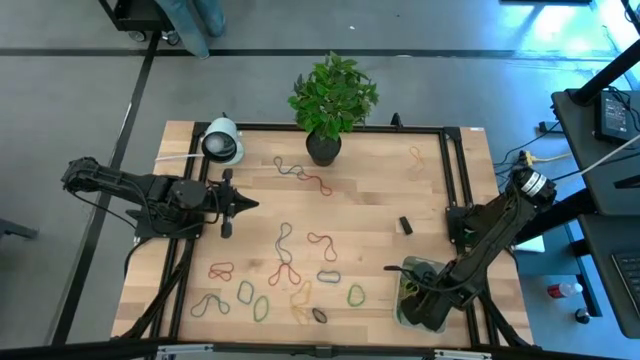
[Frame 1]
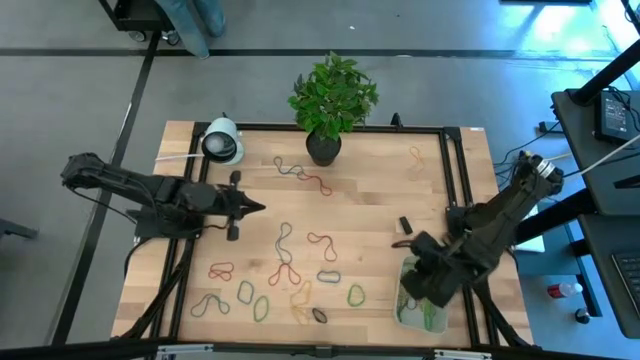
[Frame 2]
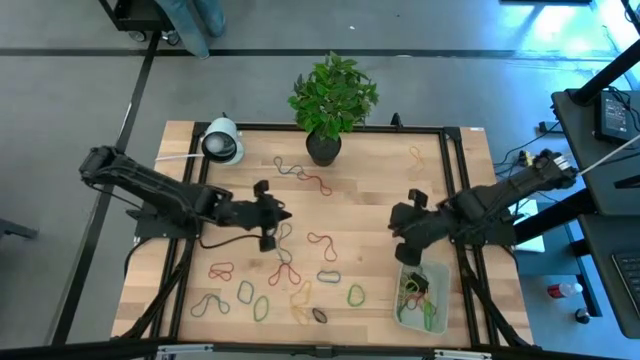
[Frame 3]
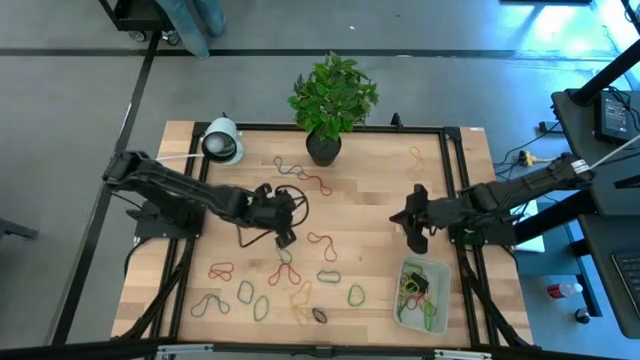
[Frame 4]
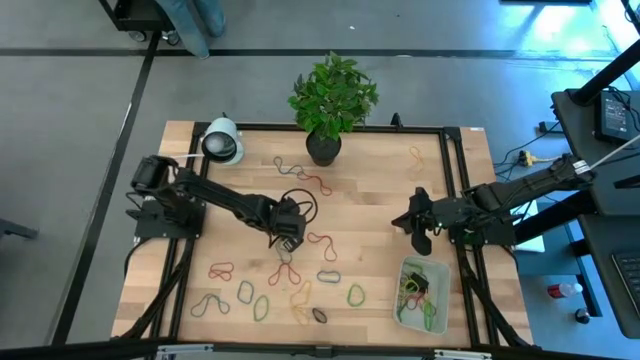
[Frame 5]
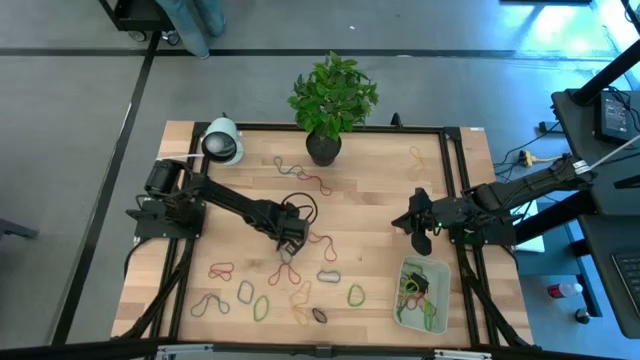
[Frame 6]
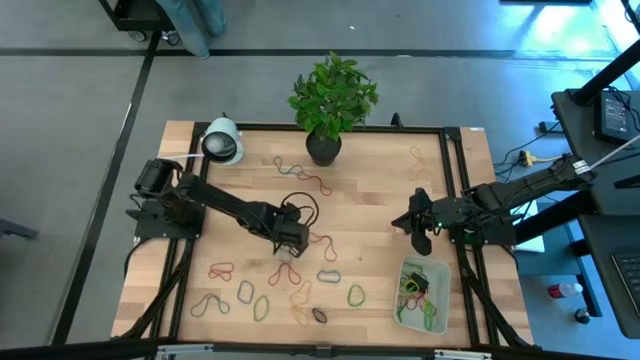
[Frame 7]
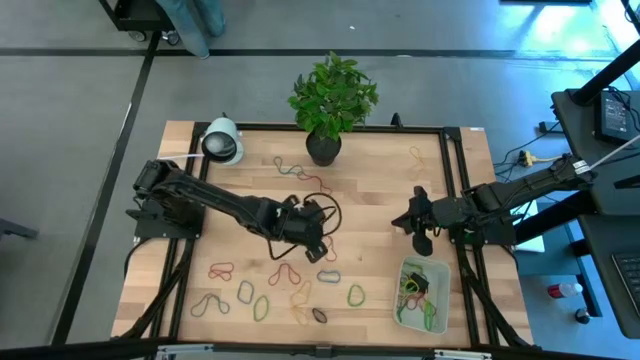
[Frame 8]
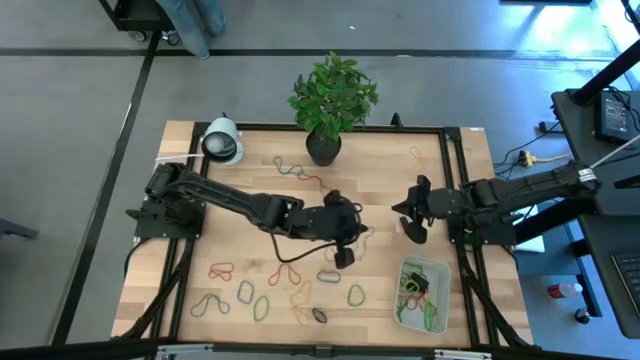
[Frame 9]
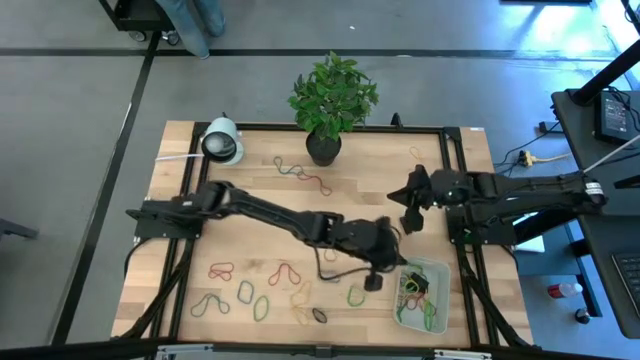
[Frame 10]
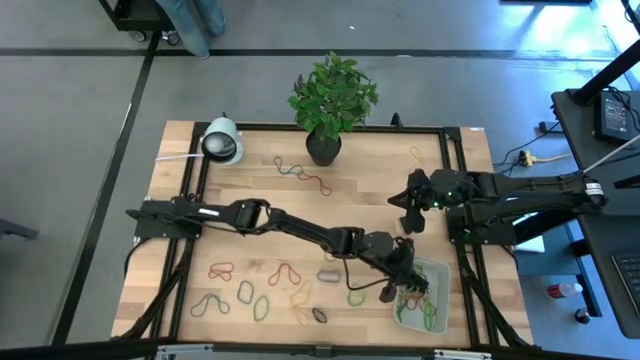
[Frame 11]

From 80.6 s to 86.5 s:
Task: Pick and place rubber bands into bin
Put the blue rubber band into the gray bin

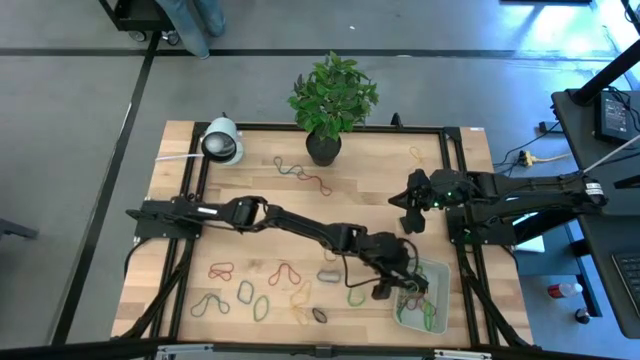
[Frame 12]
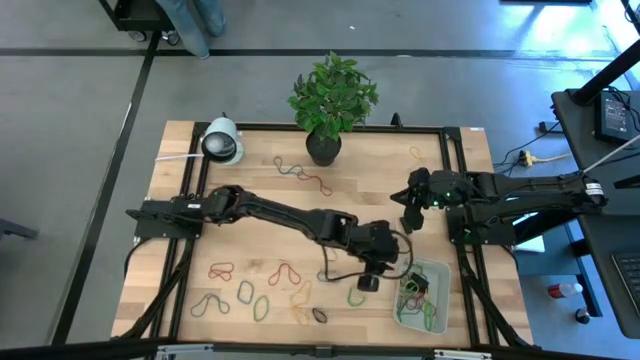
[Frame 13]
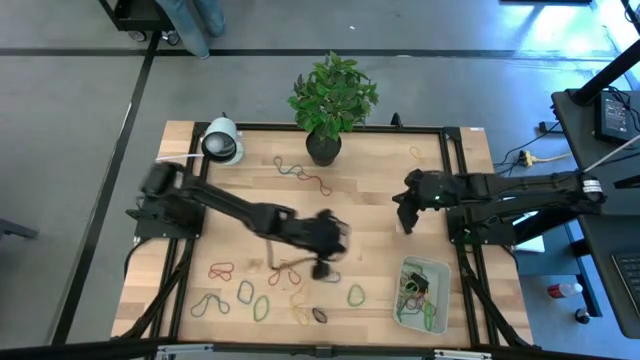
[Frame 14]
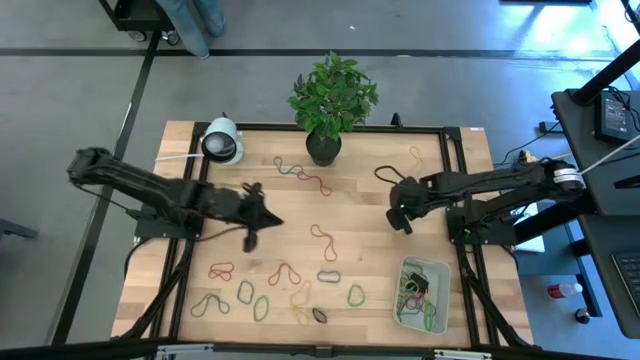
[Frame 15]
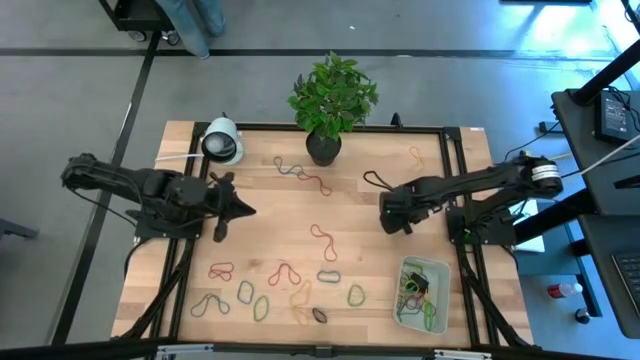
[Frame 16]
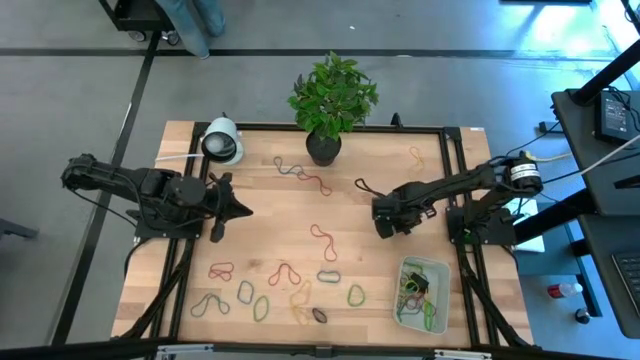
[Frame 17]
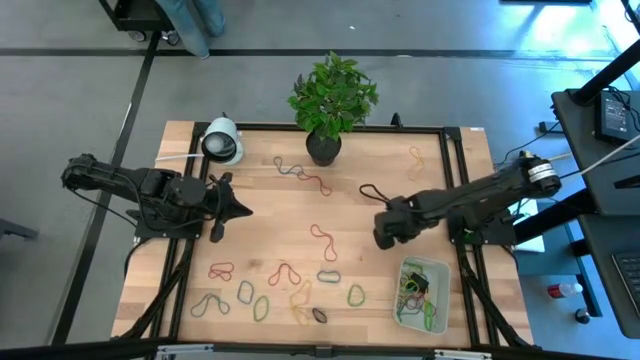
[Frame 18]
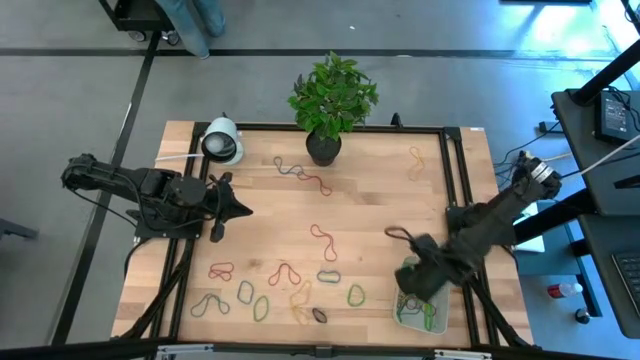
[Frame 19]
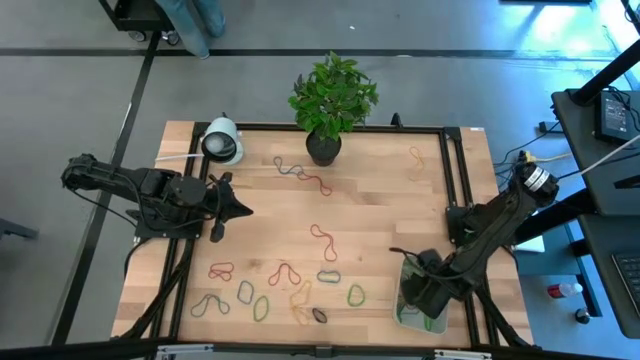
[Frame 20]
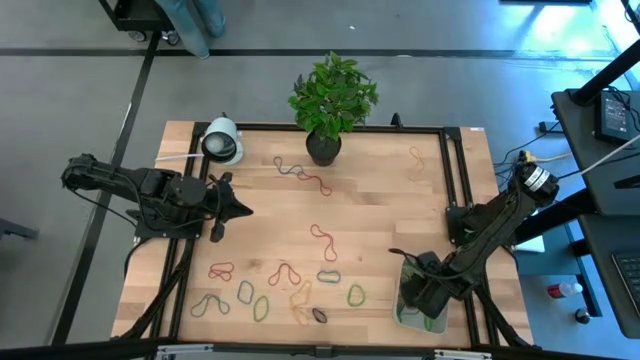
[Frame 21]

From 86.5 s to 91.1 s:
Put the black rubber band into the gray bin

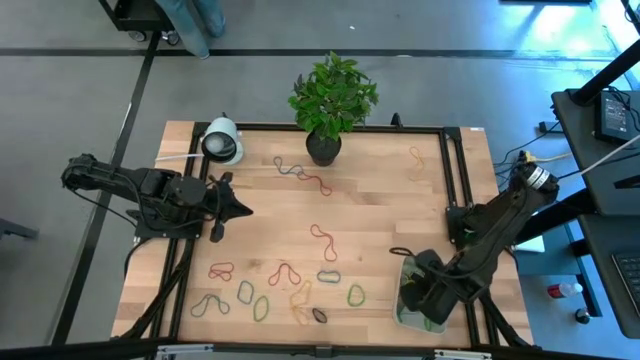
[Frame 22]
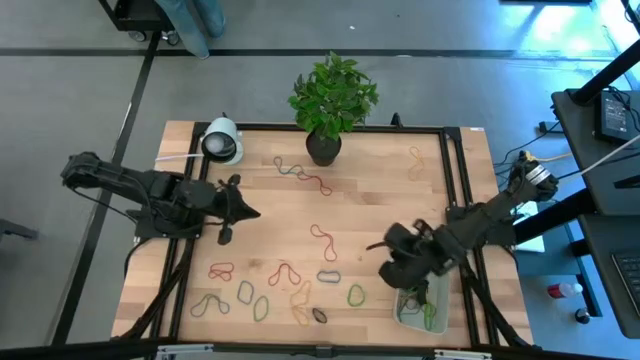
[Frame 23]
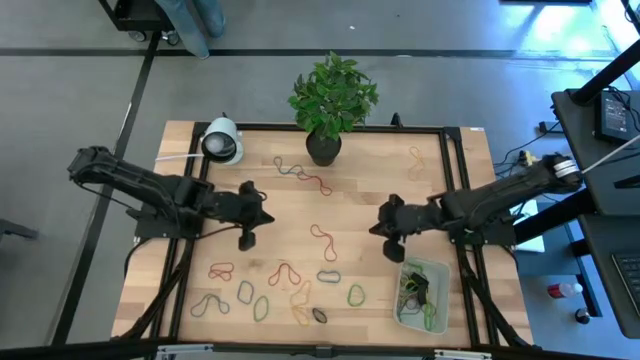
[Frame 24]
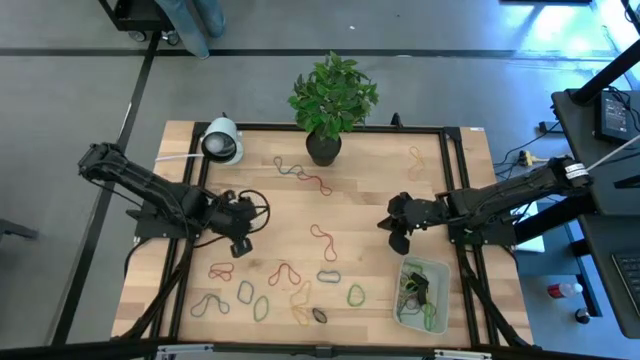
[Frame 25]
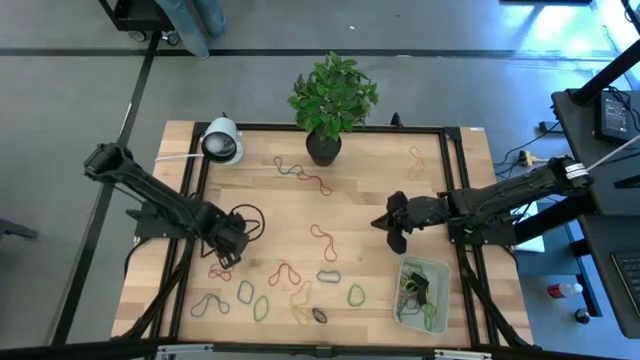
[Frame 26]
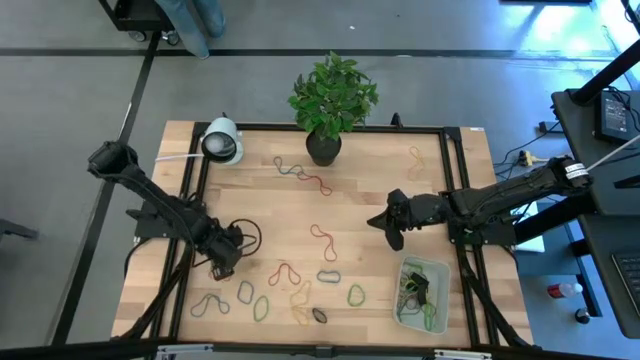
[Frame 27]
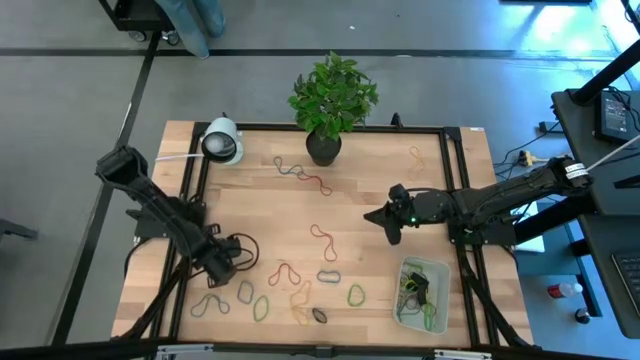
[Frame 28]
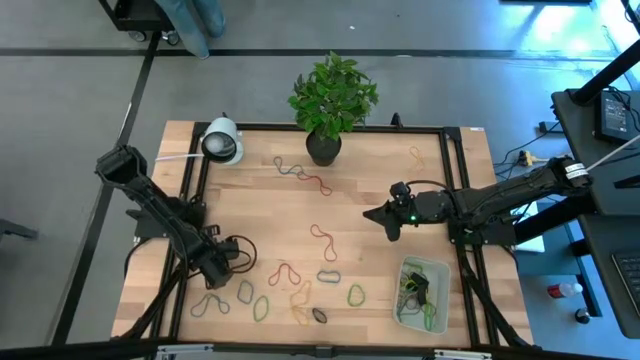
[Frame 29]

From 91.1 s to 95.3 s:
Put the red rubber band into the gray bin

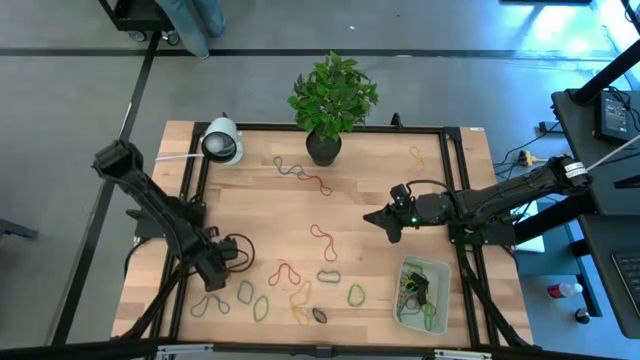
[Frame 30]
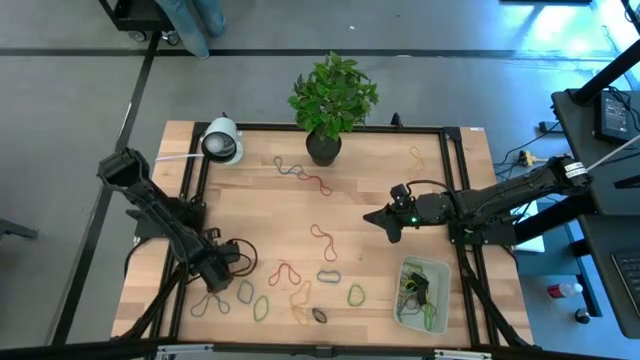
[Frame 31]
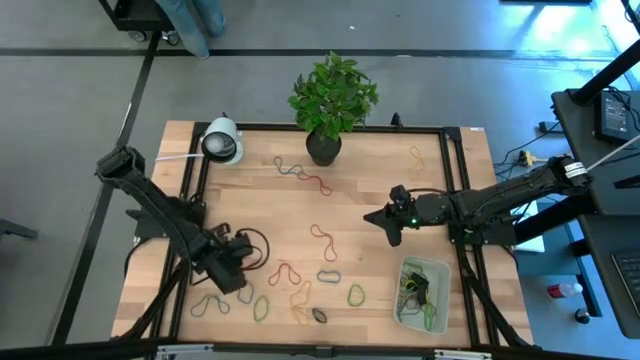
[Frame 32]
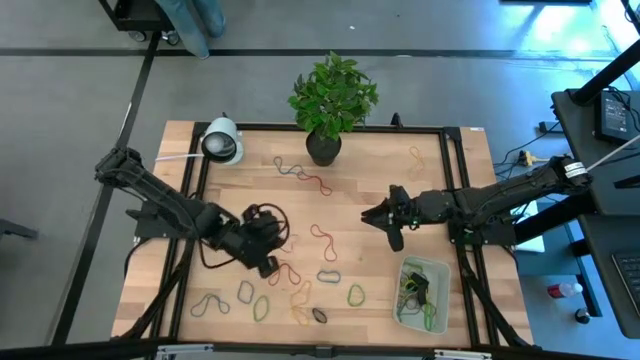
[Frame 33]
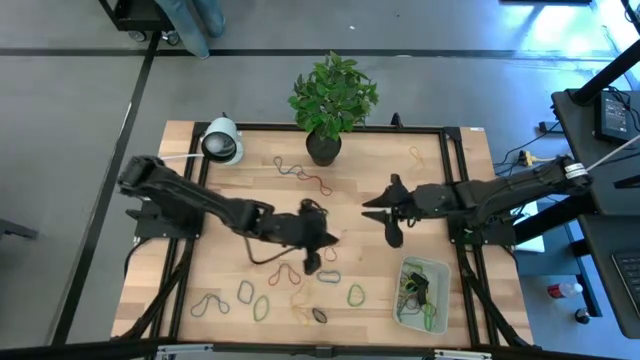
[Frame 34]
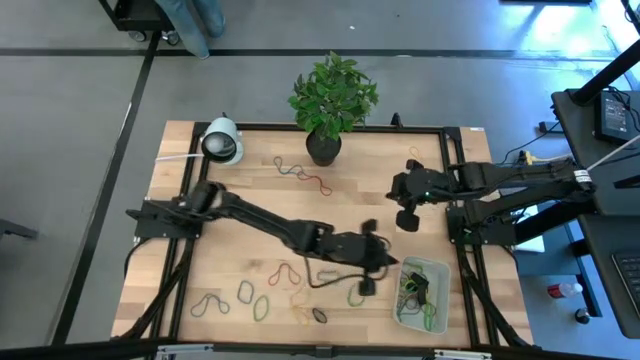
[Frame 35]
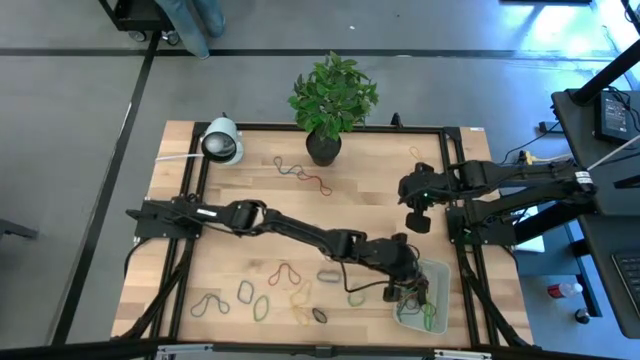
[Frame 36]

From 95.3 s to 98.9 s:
Put the red rubber band into the gray bin

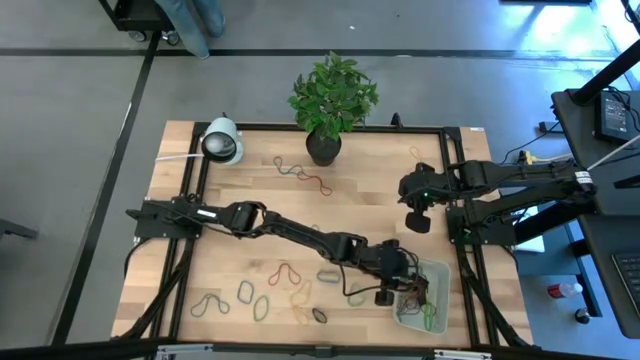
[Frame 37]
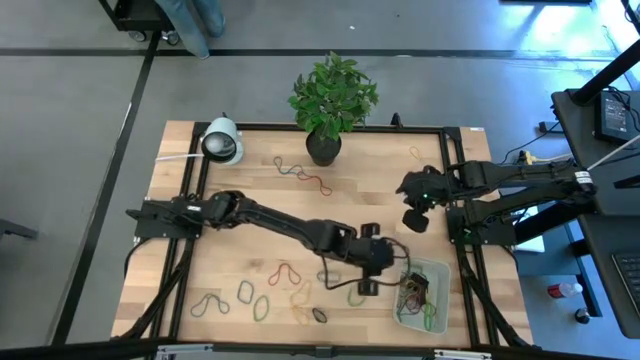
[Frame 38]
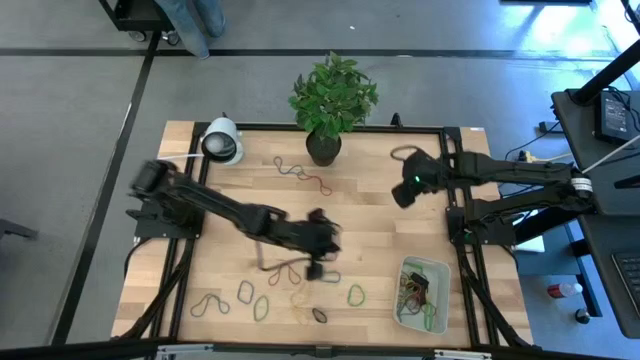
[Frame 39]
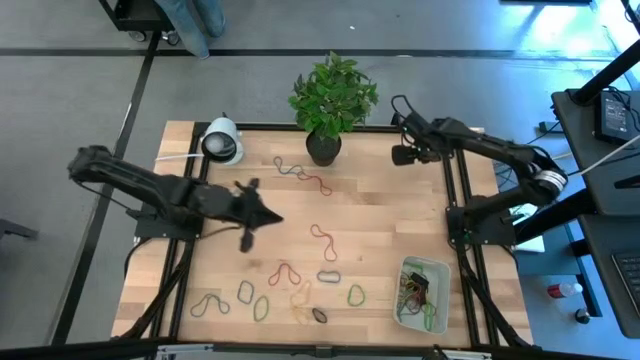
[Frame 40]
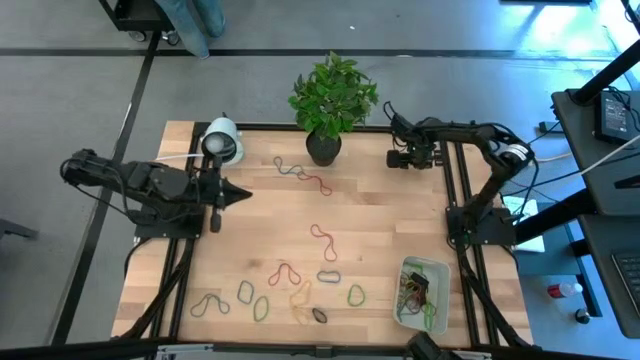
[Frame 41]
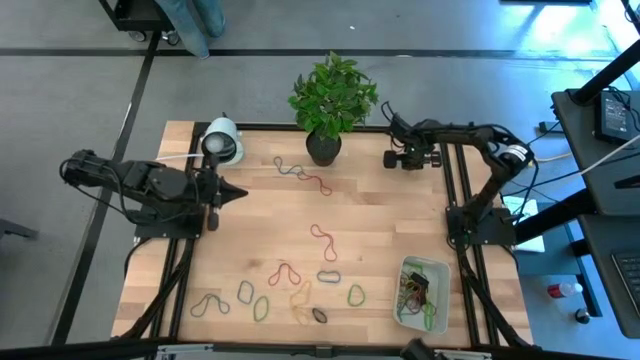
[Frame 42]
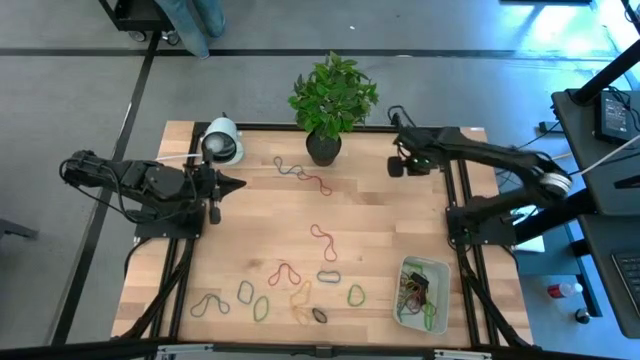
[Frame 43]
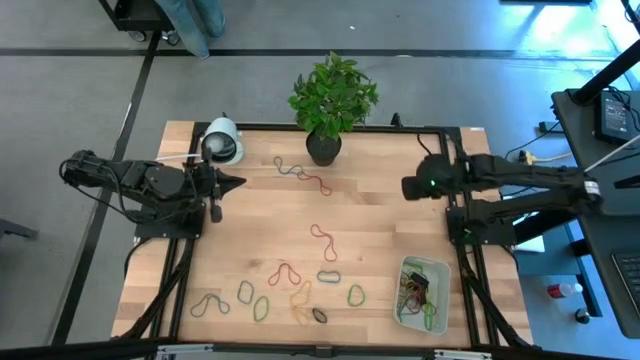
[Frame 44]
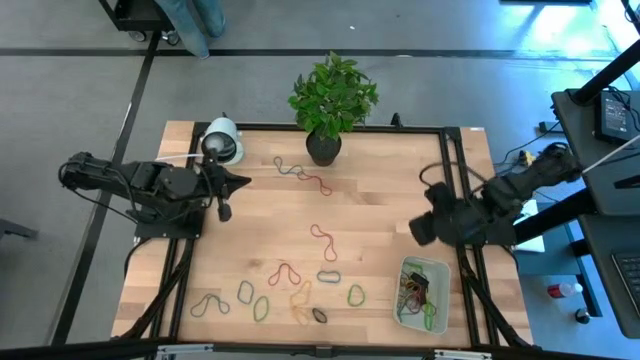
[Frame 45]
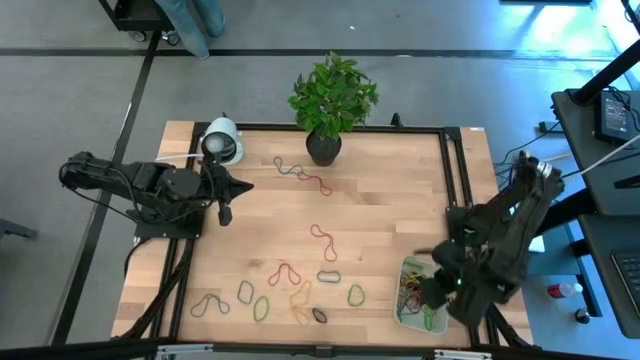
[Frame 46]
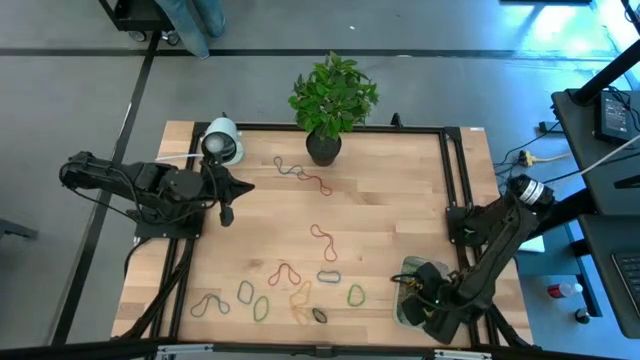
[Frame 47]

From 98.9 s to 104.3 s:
Put the yellow rubber band into the gray bin
